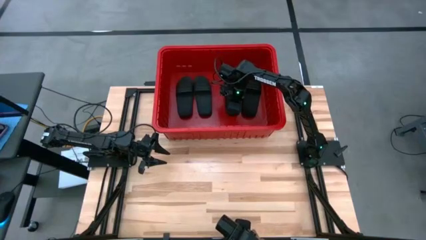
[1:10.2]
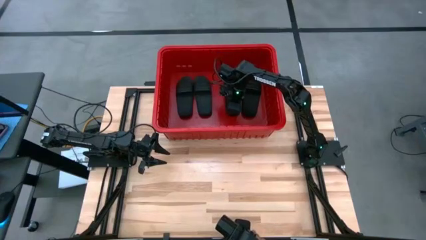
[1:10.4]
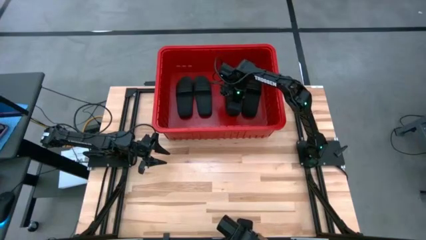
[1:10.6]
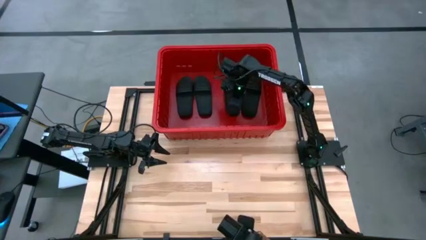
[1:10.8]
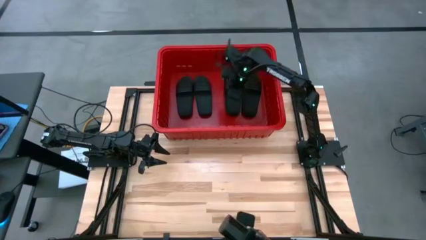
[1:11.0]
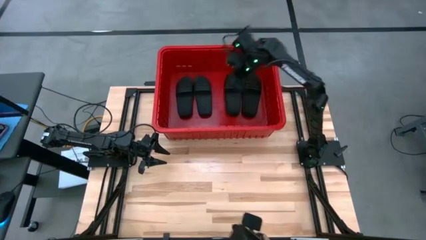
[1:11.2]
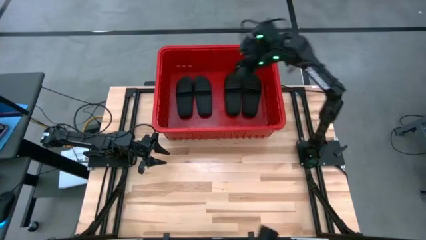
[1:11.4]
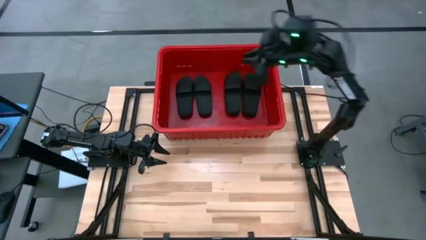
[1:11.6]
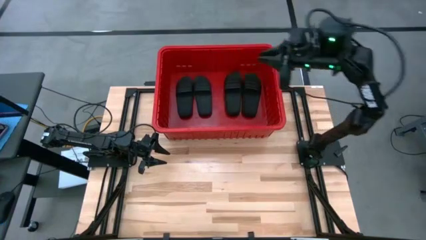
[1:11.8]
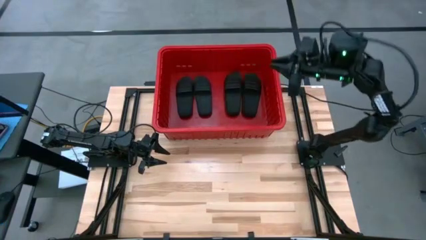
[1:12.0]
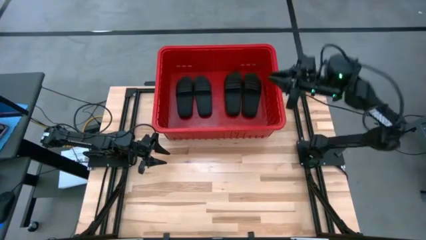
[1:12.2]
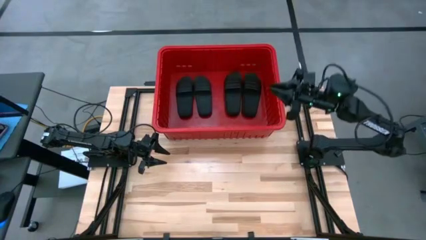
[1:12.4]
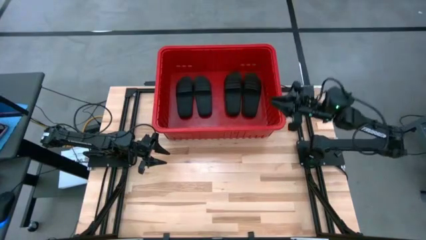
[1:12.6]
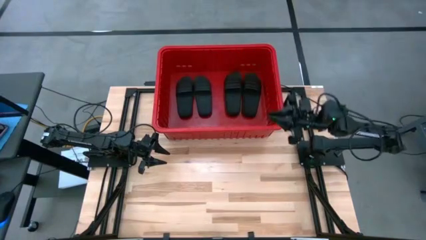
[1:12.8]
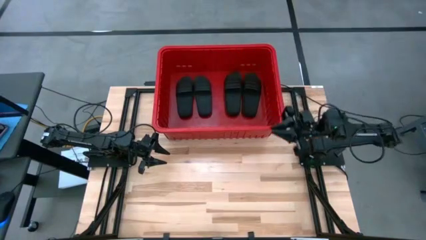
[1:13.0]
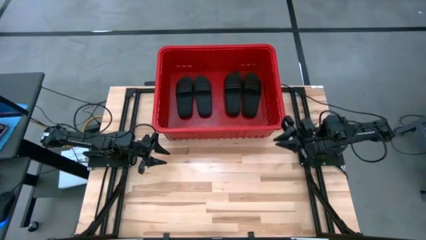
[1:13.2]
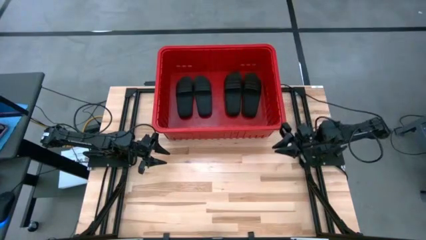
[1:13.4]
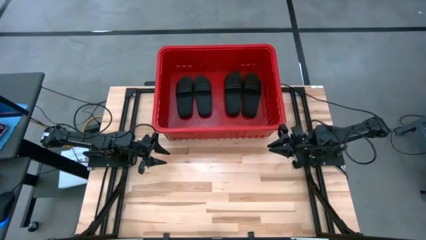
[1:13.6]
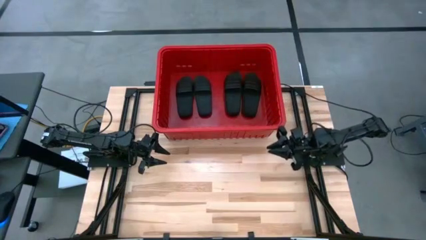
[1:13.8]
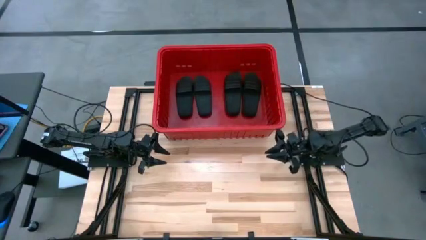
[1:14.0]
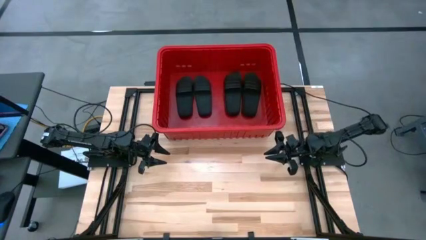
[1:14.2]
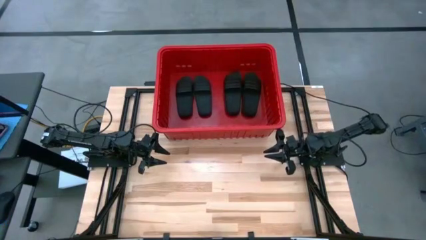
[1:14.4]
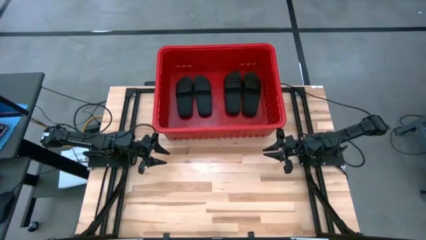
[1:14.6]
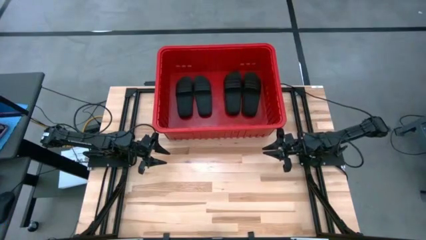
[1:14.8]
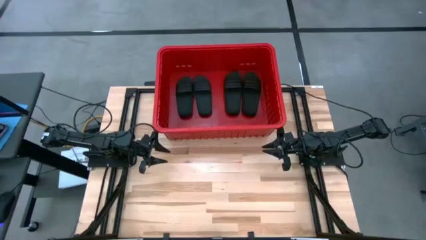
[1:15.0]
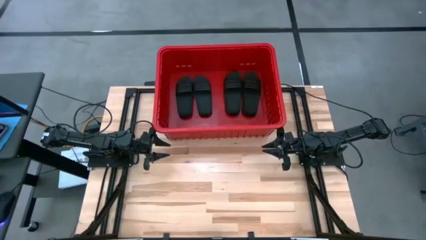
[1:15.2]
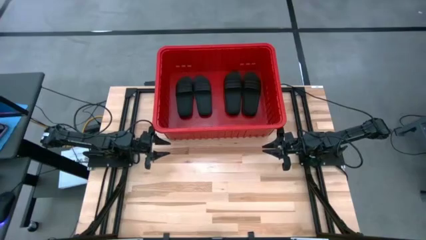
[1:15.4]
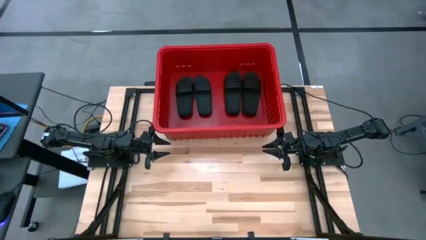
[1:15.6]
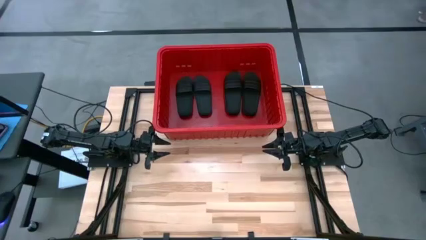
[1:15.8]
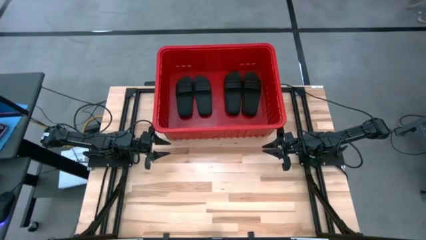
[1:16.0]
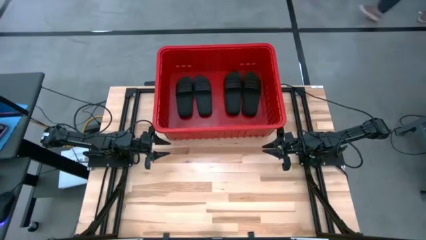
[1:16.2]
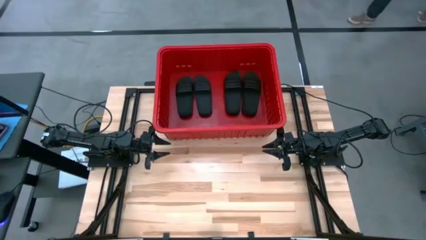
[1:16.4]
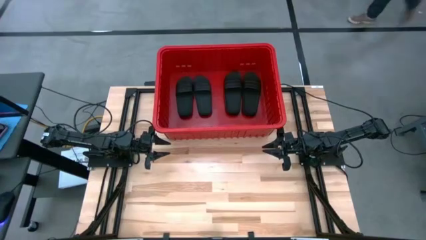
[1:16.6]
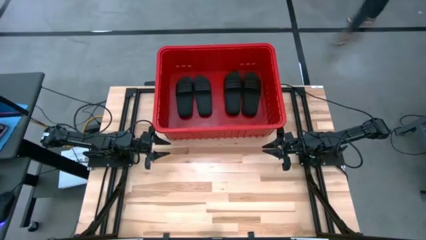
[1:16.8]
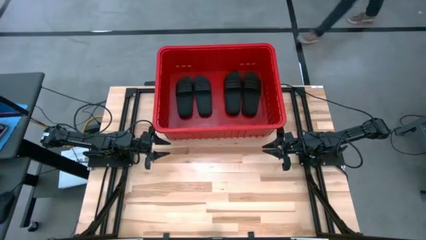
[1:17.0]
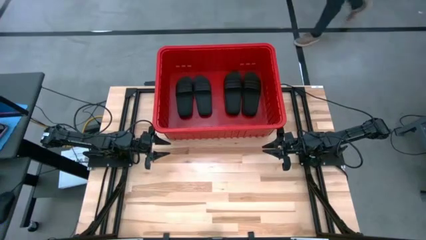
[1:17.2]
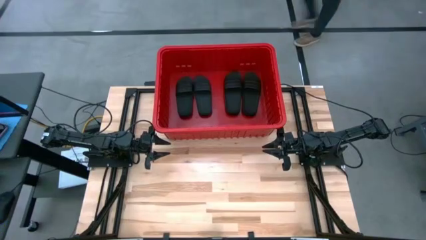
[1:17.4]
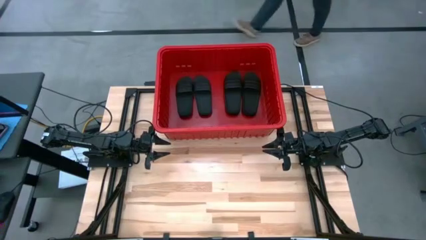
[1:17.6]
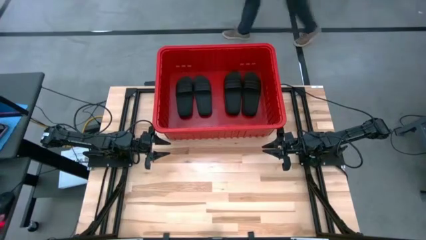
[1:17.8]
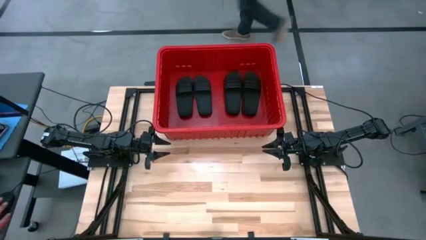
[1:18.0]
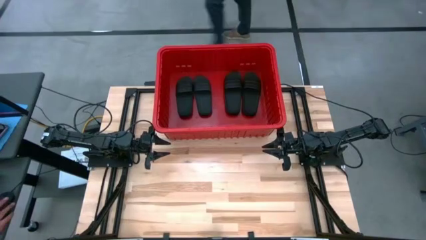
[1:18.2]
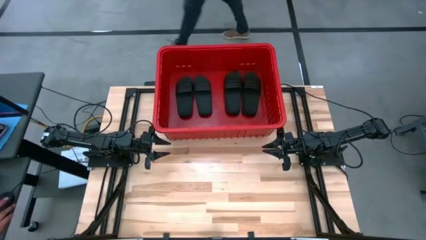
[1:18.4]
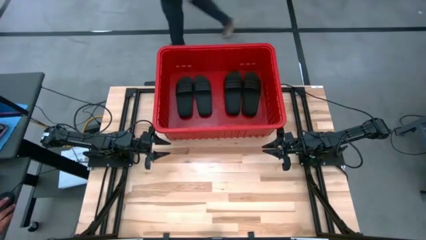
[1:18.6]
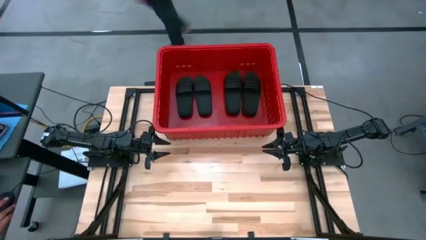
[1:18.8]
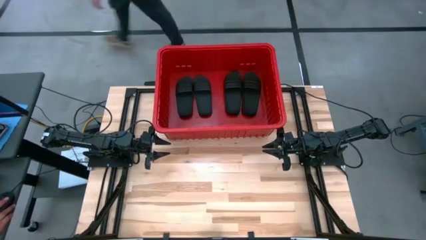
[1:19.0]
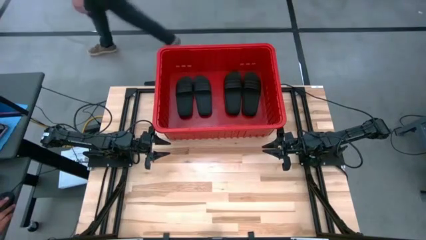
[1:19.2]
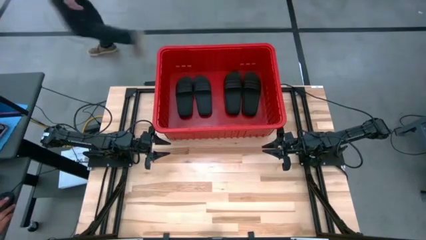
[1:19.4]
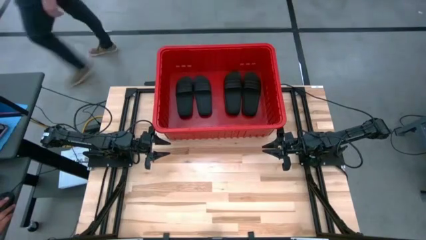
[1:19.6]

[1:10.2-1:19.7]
Task: Pick and place slides into bin
Return to Home Position

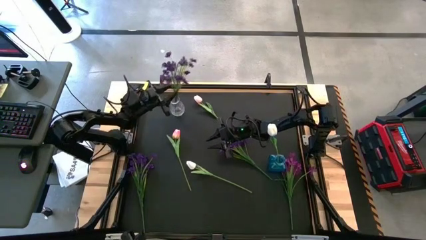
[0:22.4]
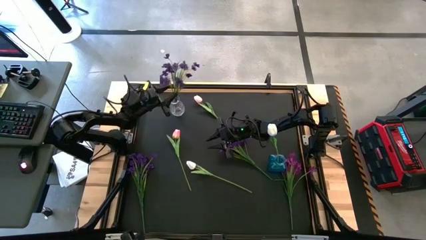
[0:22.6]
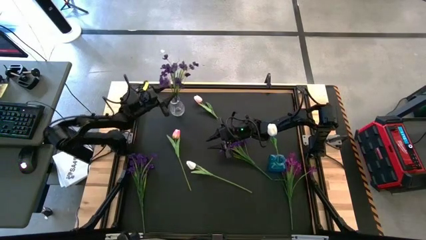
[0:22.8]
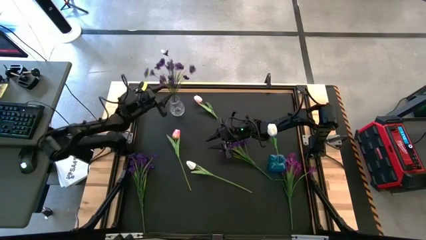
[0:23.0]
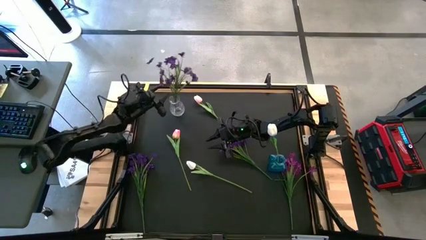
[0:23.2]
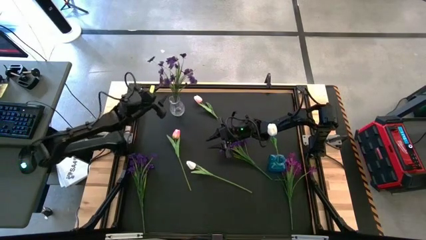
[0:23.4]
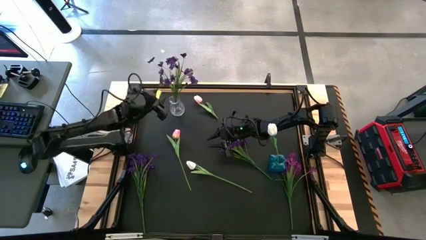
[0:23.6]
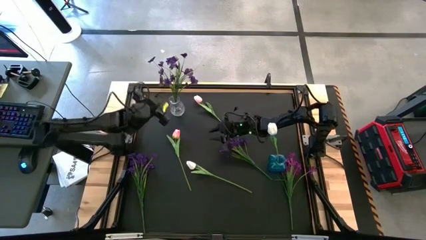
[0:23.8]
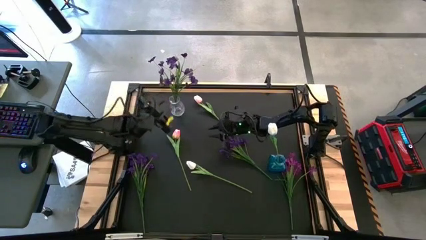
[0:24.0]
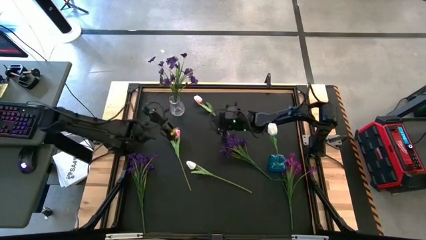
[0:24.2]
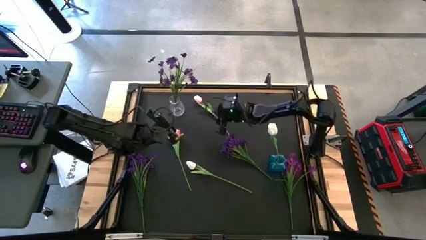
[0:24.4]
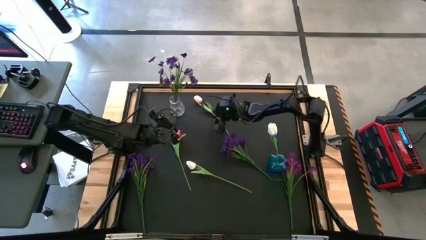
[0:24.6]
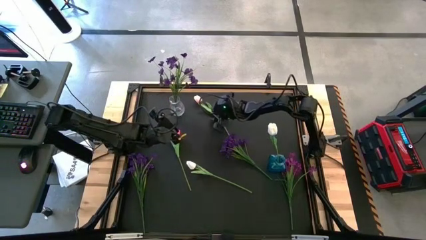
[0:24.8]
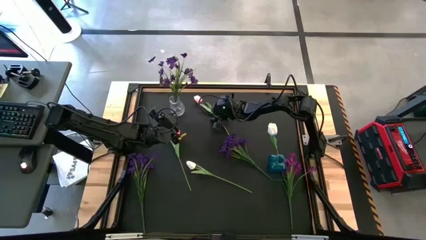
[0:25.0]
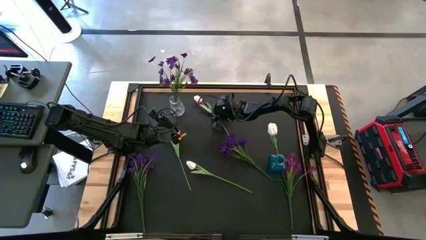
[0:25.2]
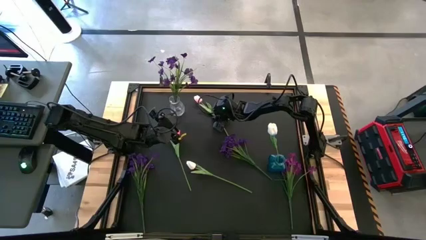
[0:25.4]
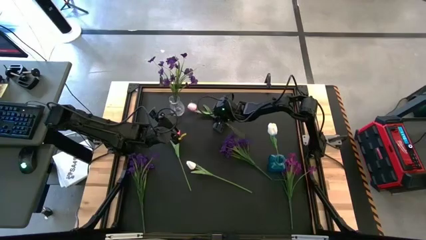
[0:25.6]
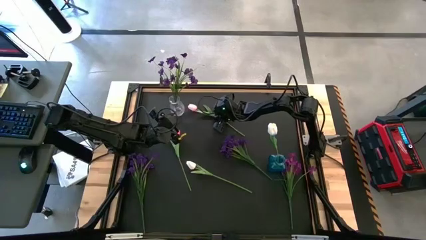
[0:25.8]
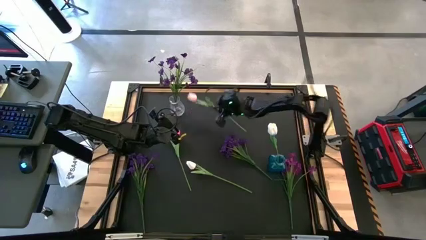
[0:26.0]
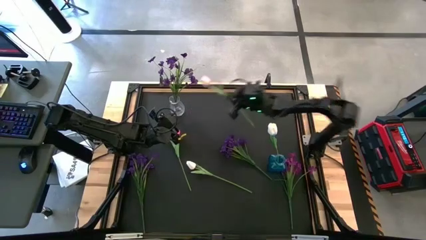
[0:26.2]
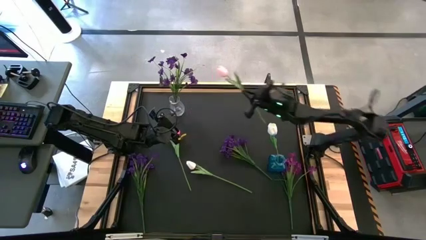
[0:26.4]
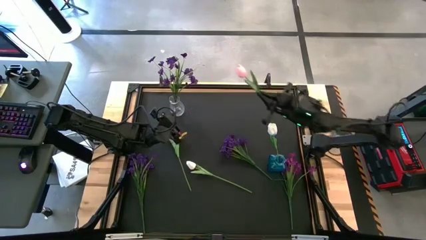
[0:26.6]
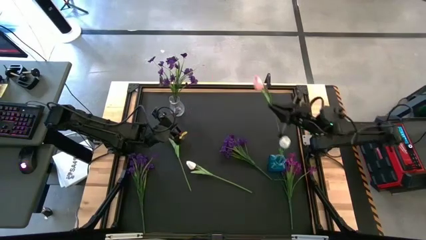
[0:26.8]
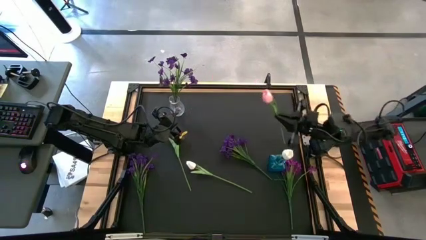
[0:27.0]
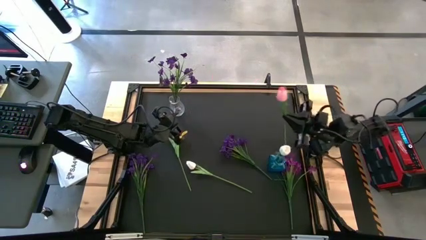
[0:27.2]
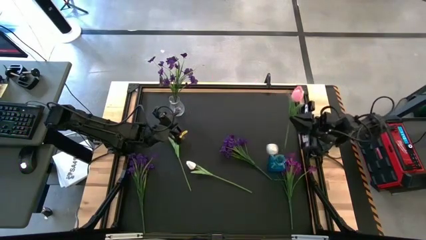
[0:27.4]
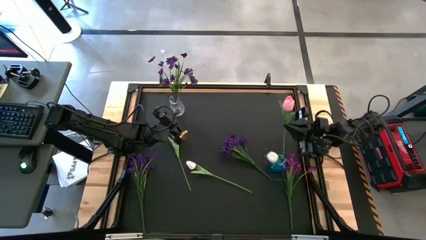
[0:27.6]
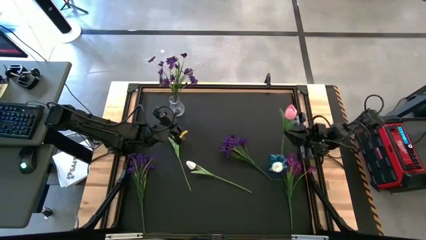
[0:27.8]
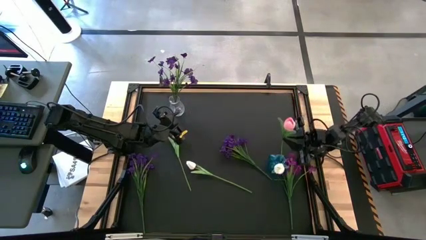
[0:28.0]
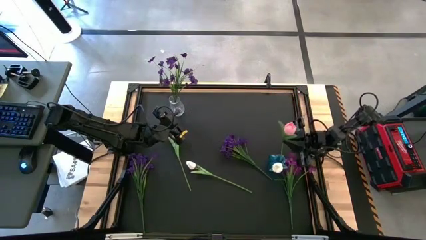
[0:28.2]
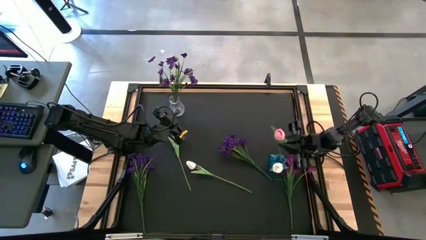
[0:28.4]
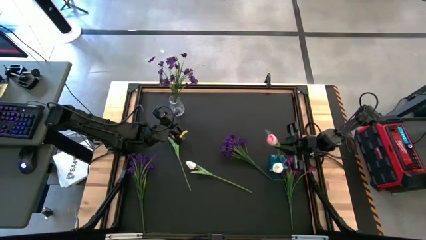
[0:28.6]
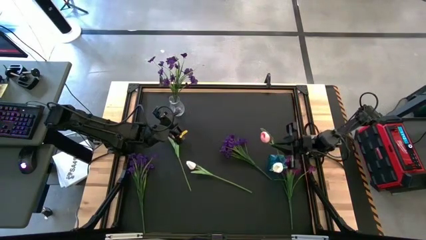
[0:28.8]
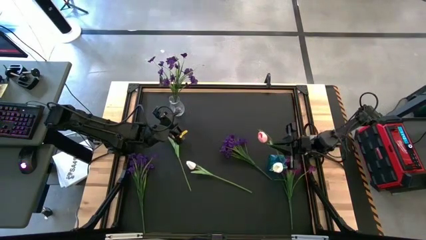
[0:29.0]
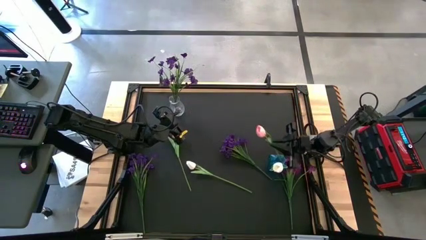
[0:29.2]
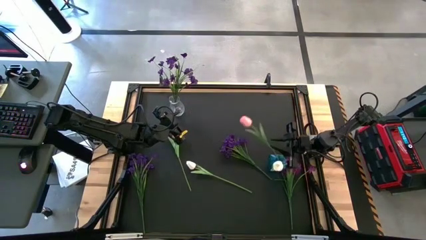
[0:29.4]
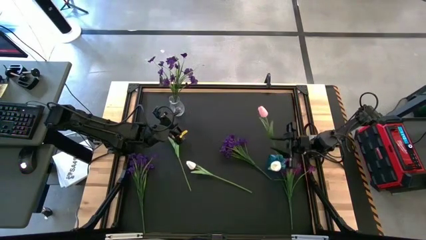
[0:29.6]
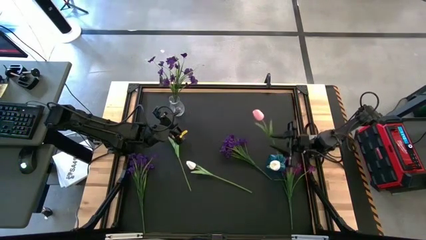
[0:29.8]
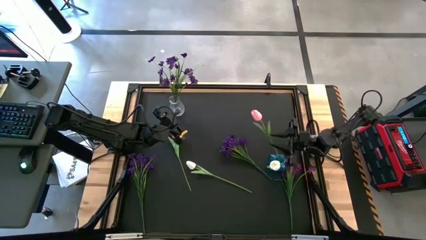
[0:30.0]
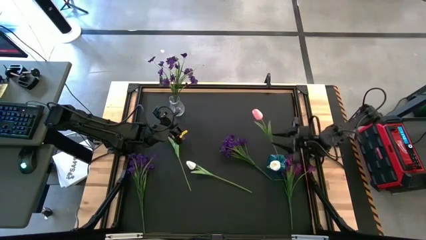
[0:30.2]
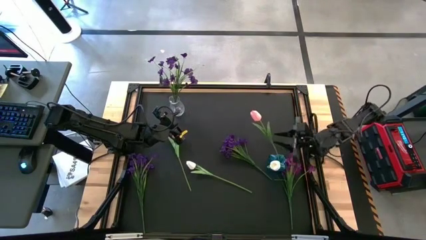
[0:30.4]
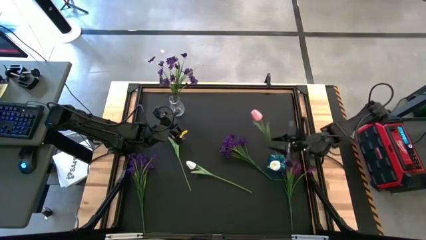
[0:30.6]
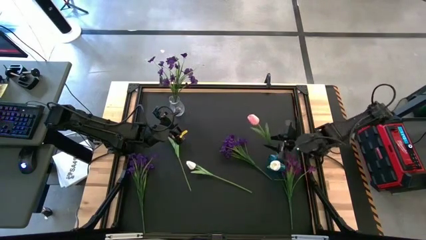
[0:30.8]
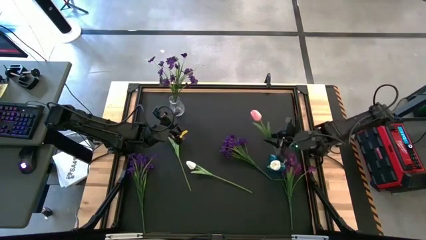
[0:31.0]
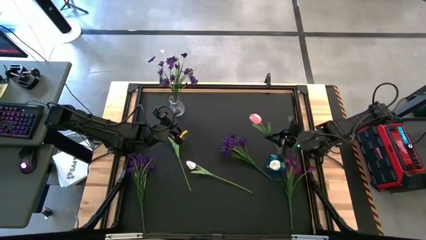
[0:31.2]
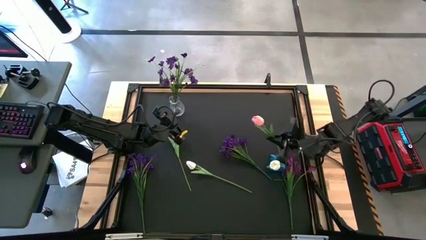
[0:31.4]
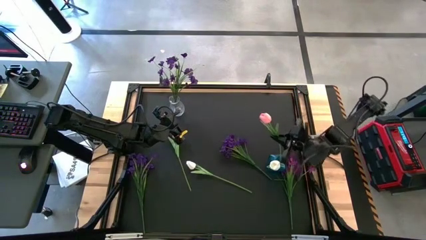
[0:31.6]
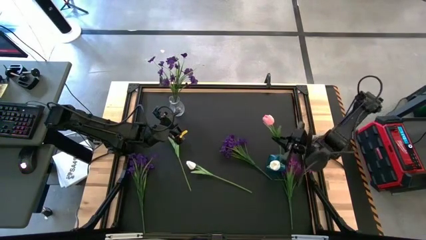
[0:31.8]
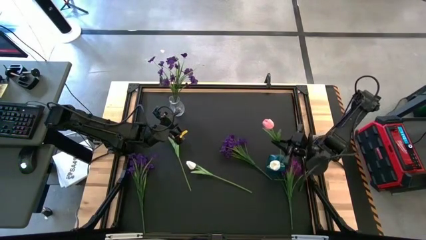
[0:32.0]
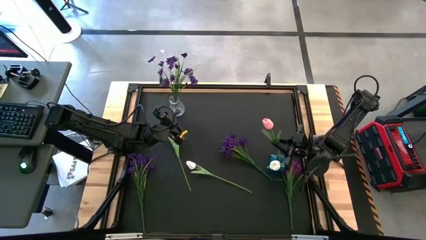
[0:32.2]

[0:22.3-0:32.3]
Task: Sort flowers into vase by color
Put the top pink flower into the transparent blue vase
